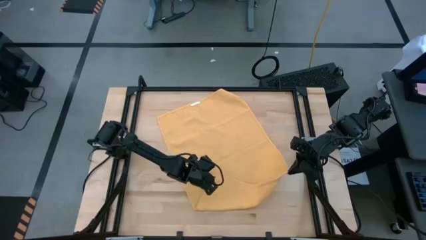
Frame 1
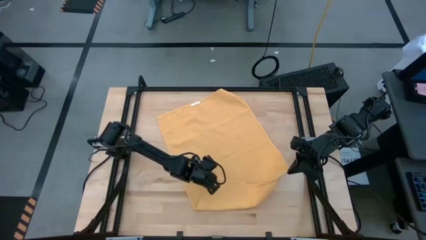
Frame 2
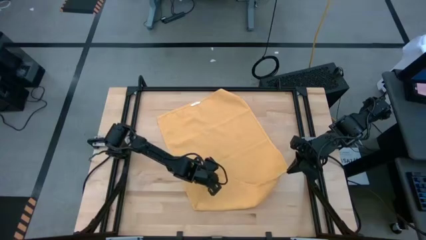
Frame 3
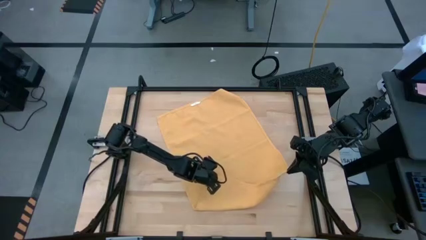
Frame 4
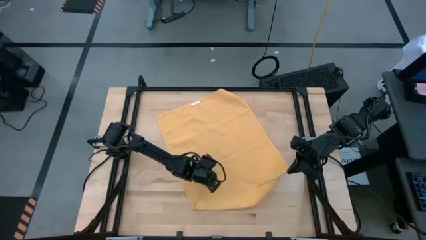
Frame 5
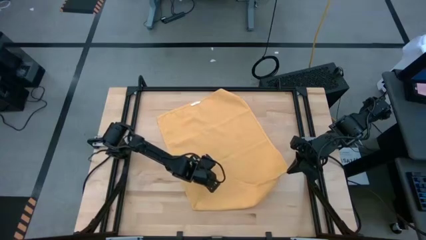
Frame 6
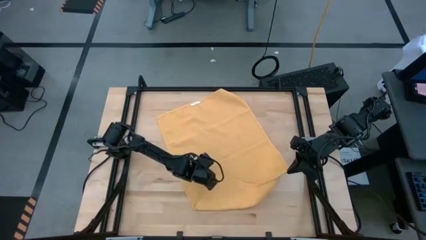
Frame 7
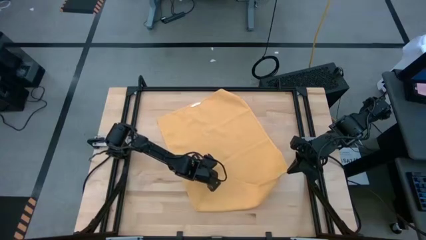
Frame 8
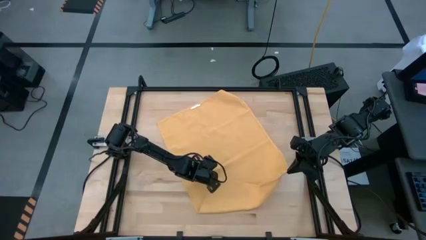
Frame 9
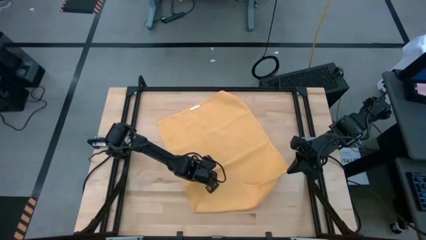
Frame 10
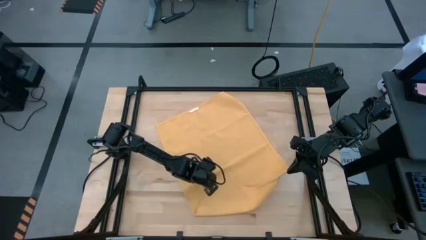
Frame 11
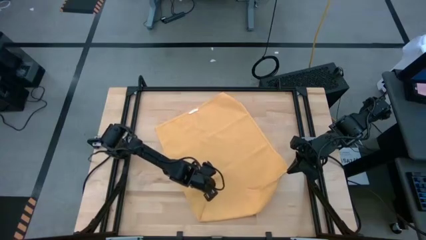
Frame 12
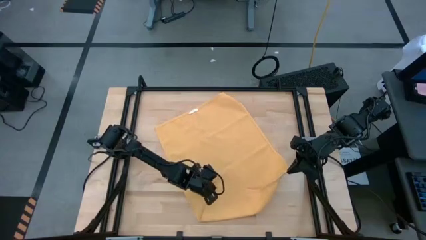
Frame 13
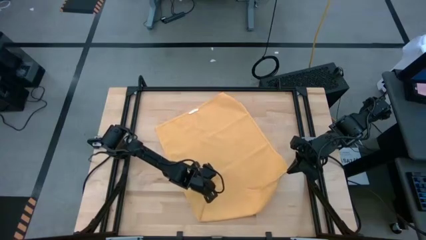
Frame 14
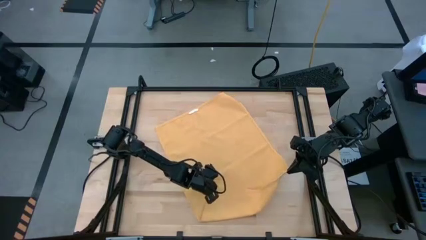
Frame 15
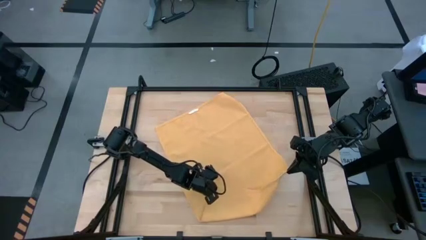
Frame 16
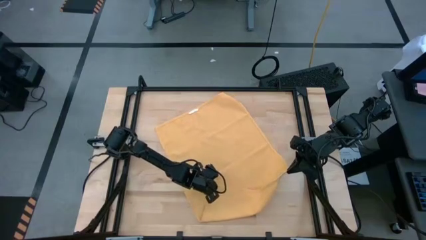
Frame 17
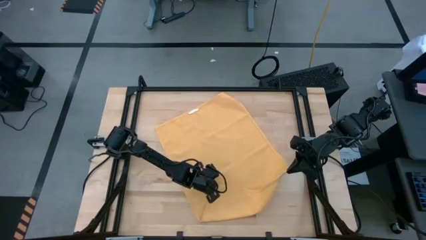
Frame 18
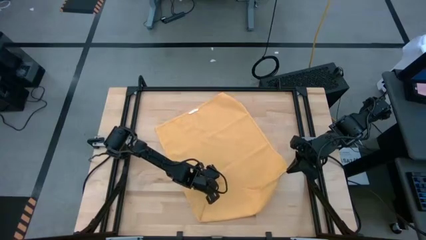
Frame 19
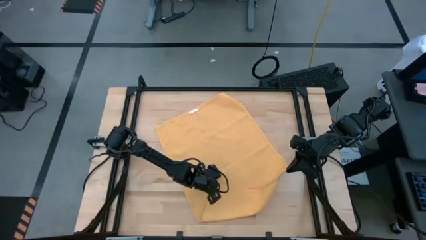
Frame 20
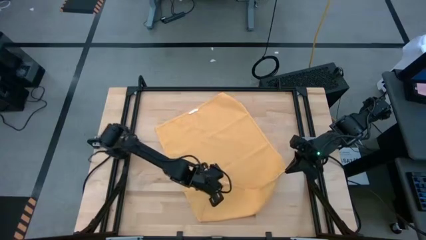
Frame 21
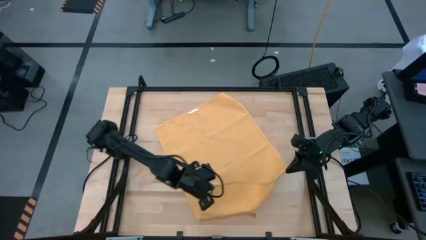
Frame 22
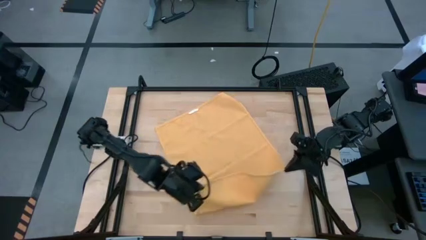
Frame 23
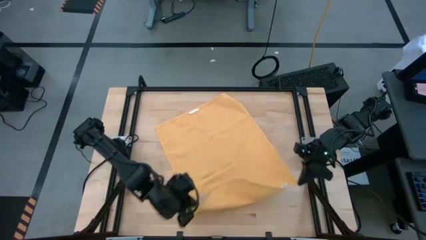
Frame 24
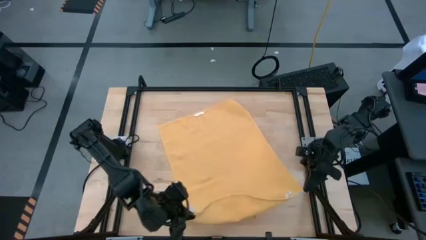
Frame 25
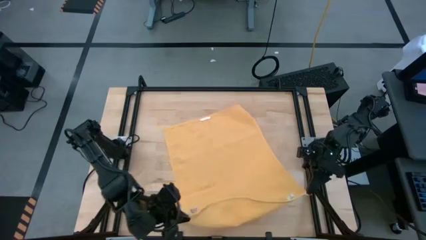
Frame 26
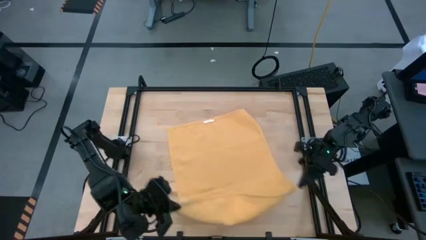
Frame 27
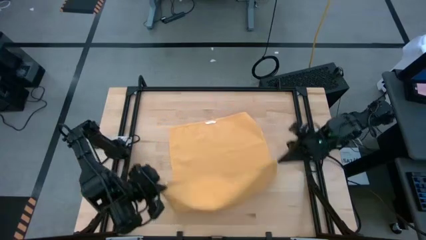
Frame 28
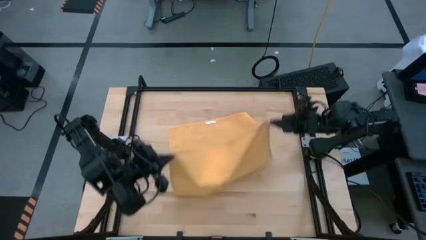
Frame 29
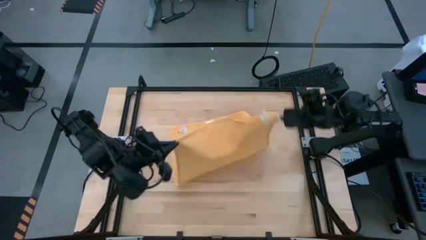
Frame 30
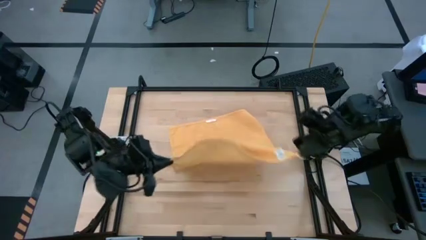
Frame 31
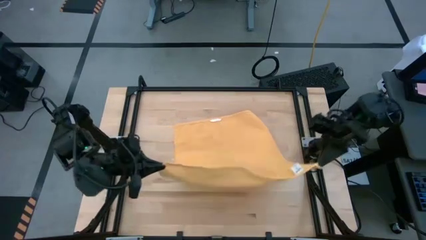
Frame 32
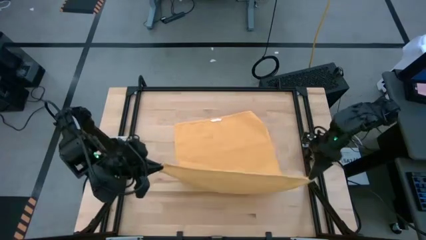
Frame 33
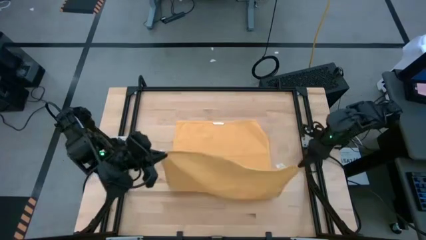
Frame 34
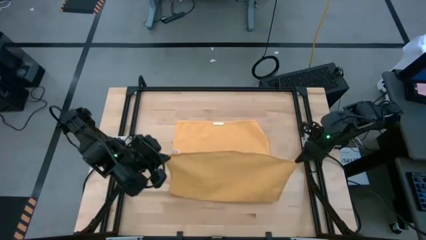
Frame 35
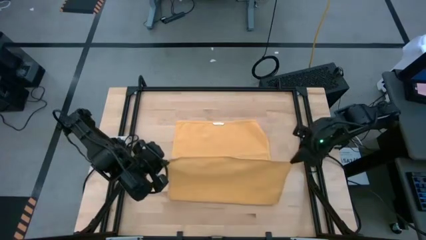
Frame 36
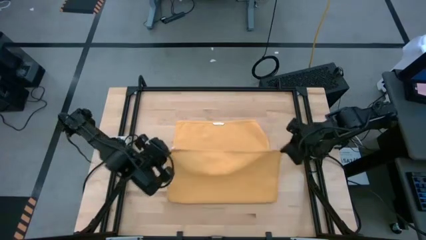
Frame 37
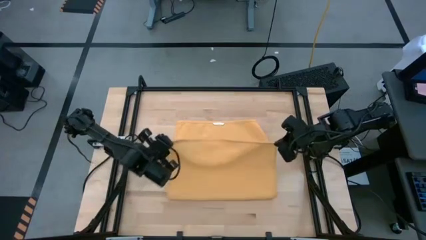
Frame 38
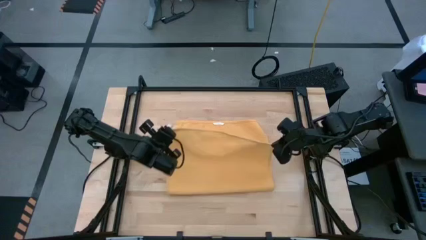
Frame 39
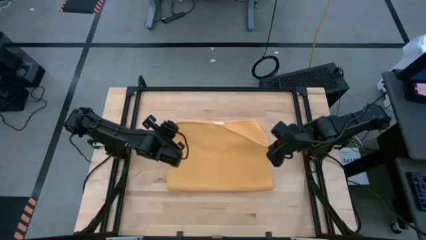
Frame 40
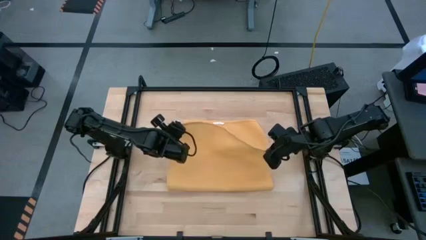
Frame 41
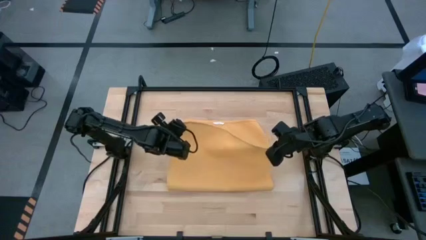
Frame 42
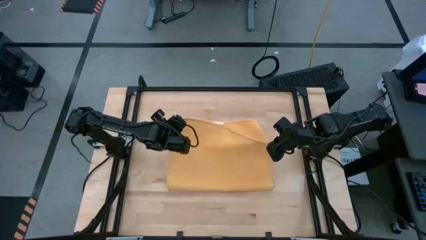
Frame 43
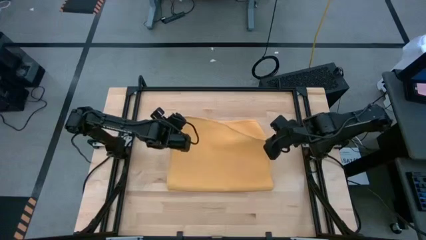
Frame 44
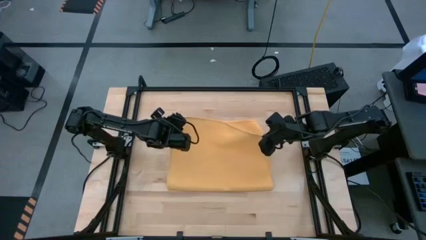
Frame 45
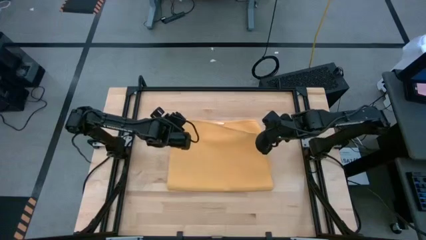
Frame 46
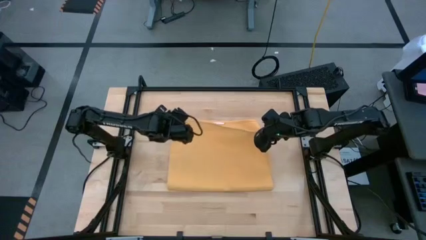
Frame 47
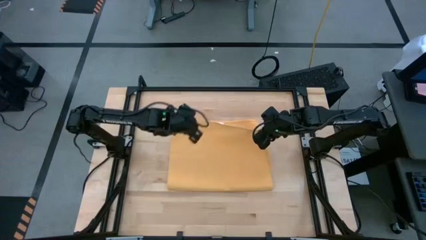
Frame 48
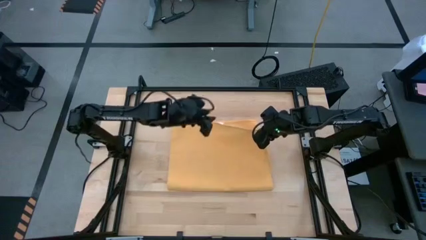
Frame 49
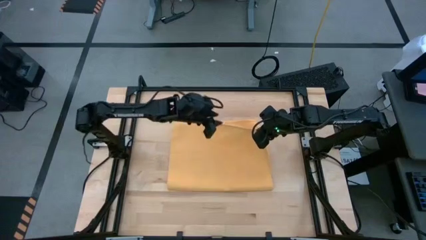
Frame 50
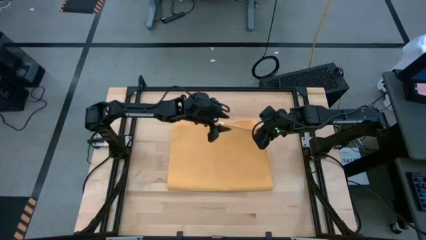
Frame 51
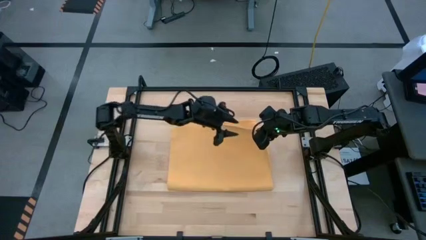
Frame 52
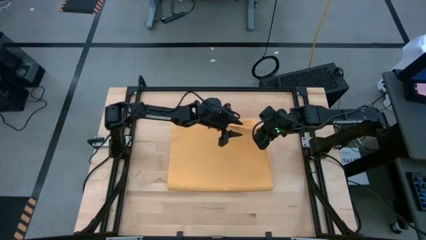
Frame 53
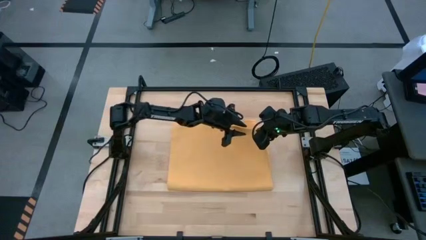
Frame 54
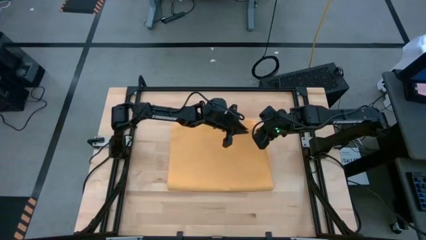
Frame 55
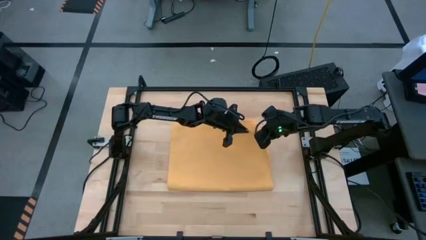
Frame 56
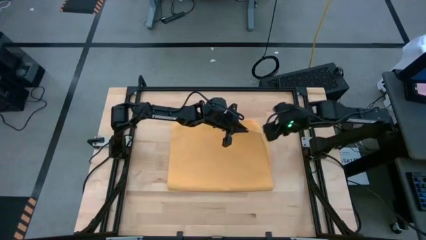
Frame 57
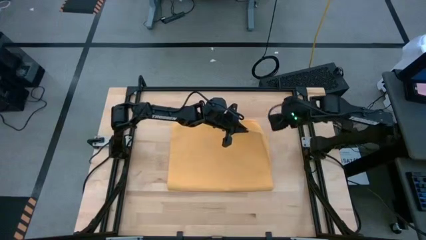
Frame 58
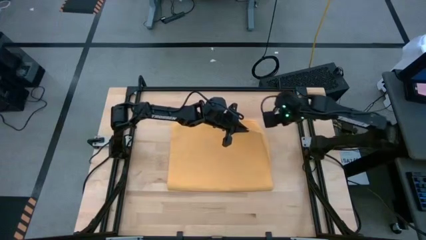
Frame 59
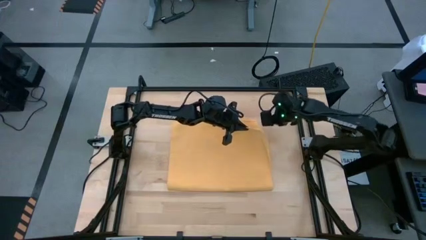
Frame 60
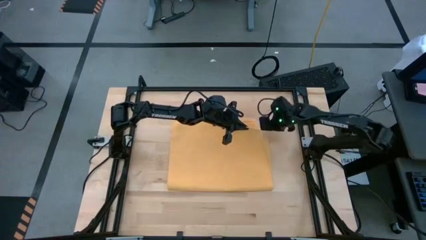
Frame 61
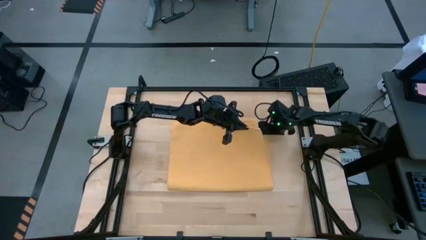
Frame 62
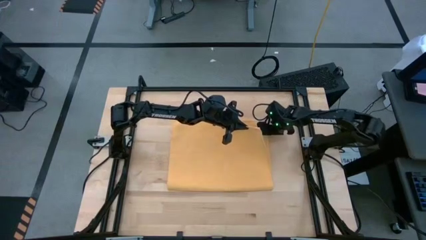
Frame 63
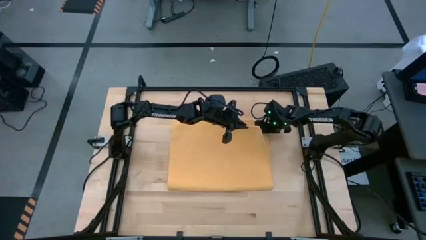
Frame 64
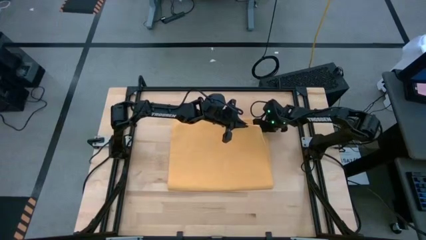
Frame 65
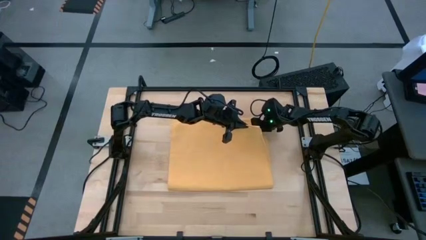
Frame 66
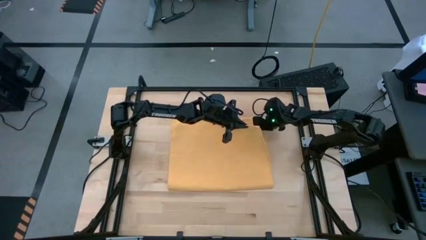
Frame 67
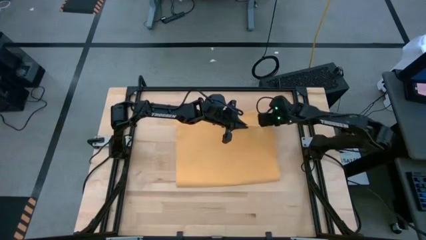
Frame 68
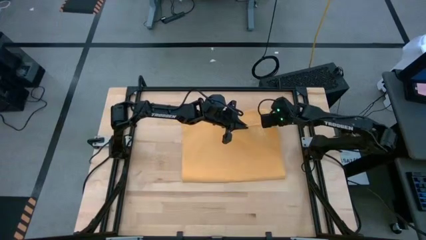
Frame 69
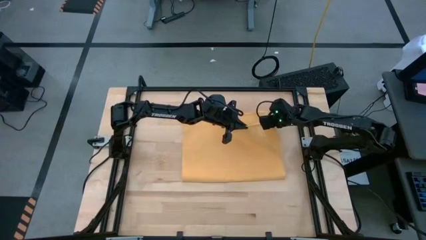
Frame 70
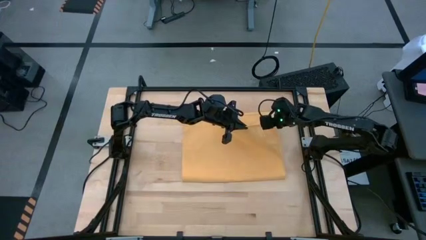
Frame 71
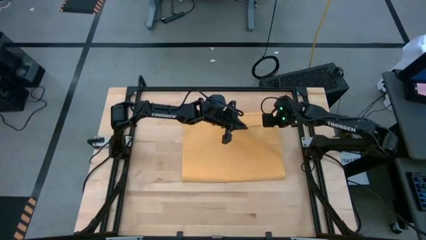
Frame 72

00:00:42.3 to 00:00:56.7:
Task: Roll towel
Fold the yellow towel
